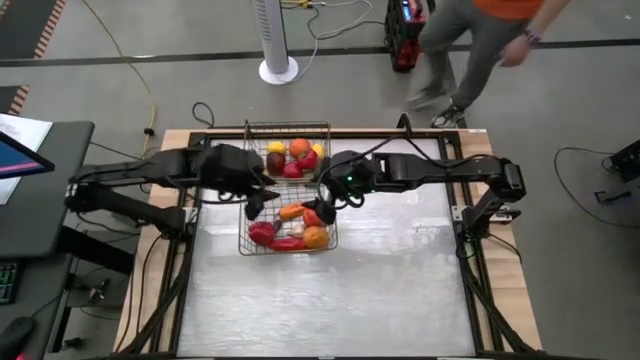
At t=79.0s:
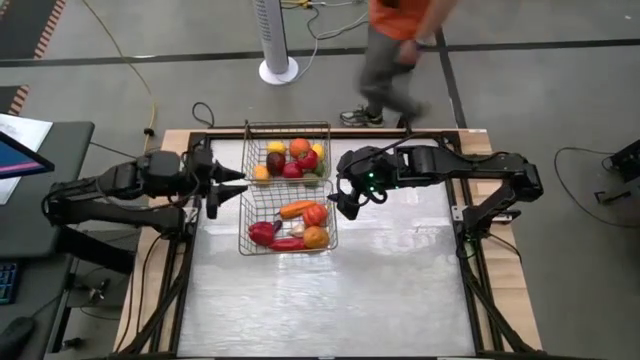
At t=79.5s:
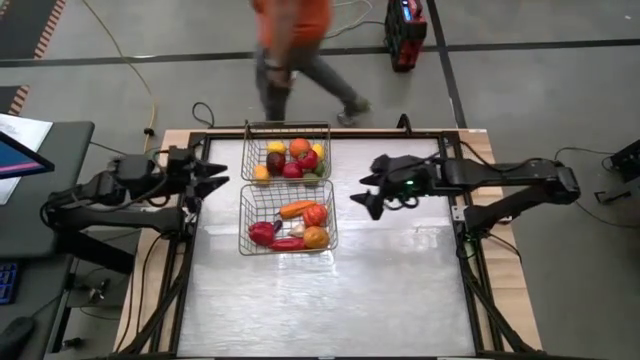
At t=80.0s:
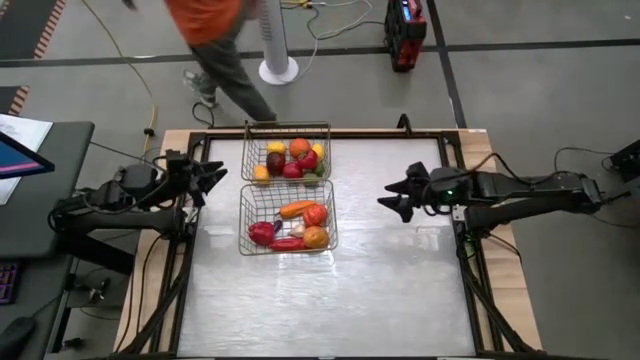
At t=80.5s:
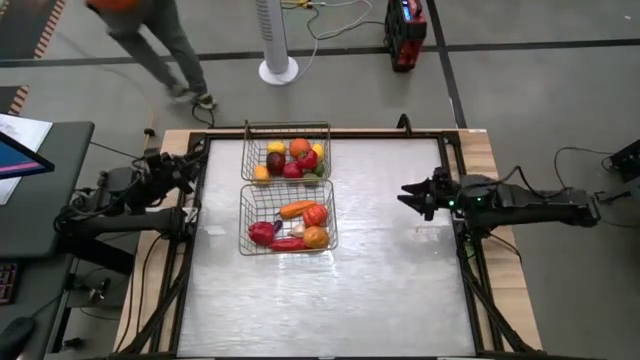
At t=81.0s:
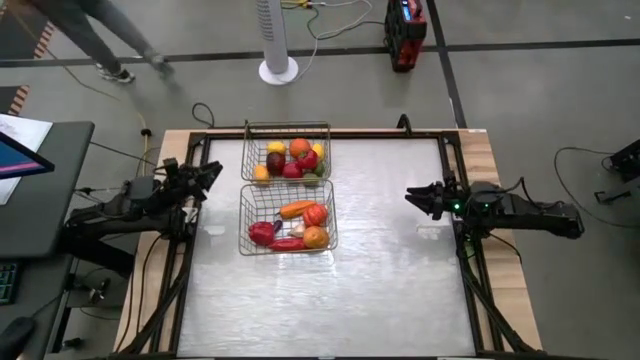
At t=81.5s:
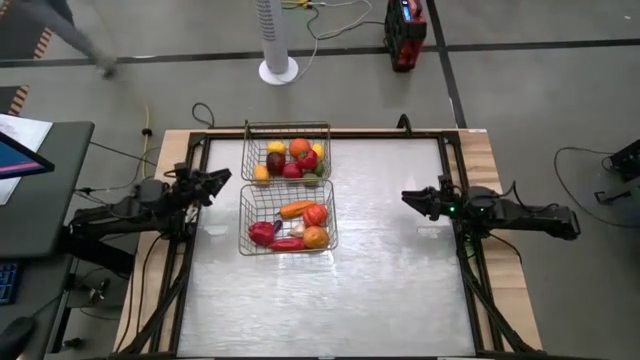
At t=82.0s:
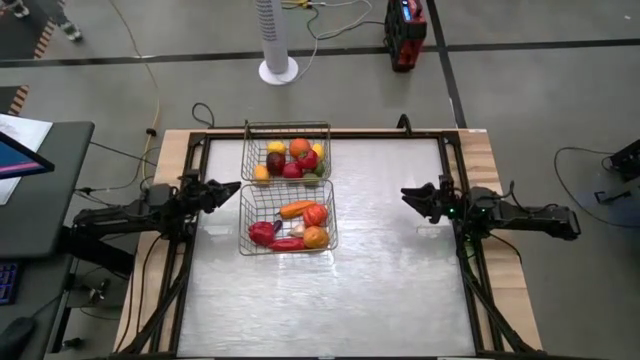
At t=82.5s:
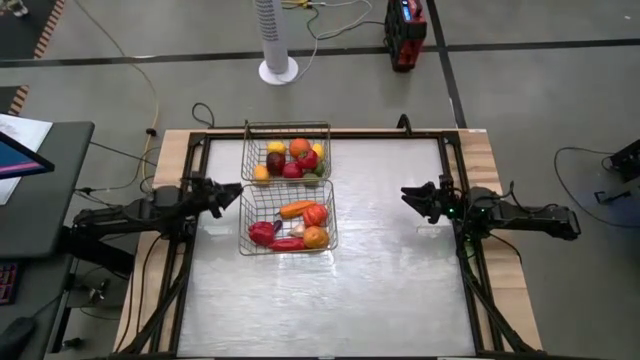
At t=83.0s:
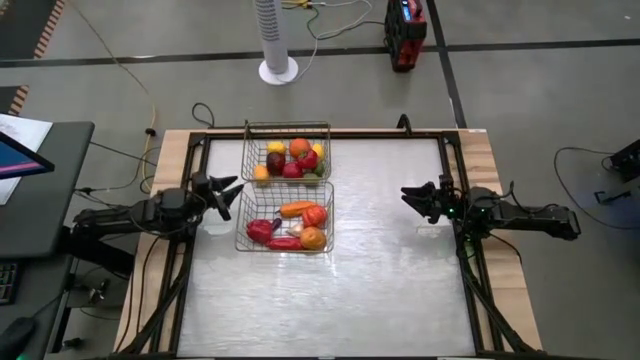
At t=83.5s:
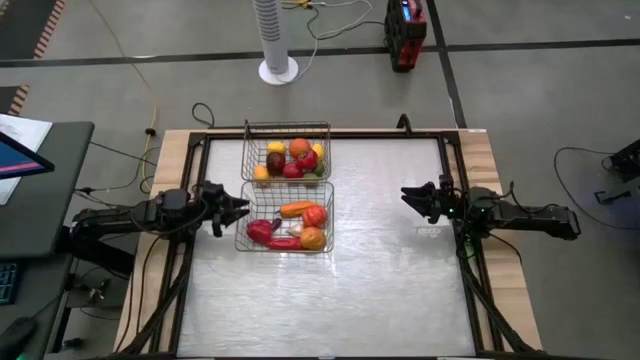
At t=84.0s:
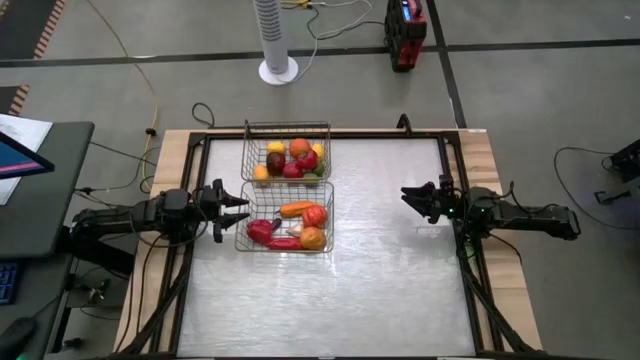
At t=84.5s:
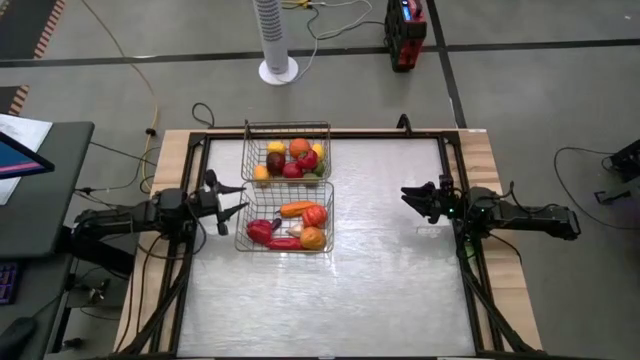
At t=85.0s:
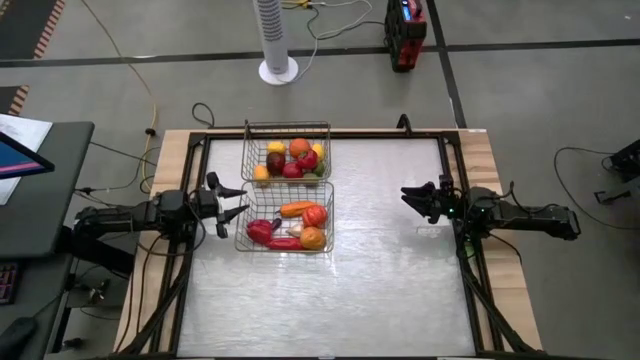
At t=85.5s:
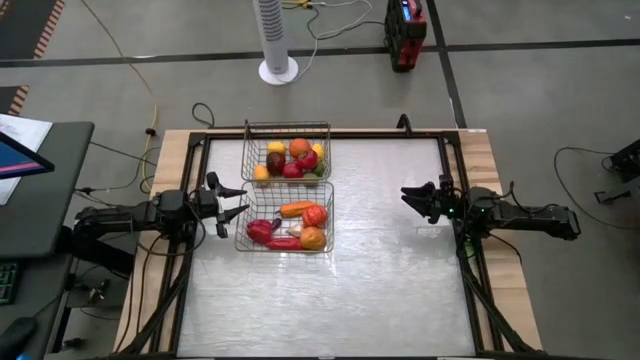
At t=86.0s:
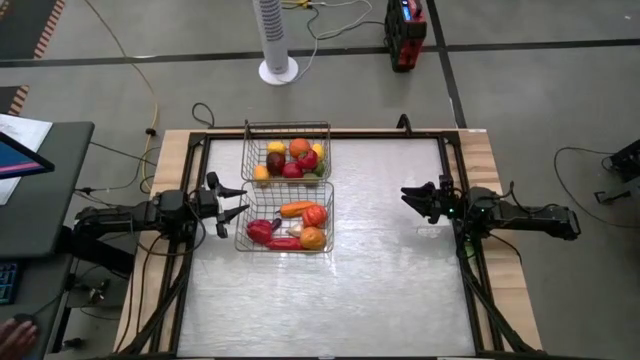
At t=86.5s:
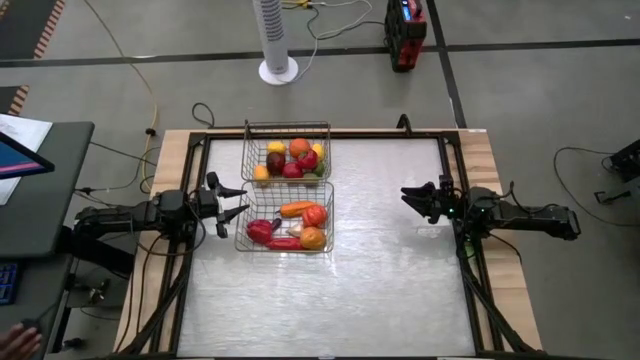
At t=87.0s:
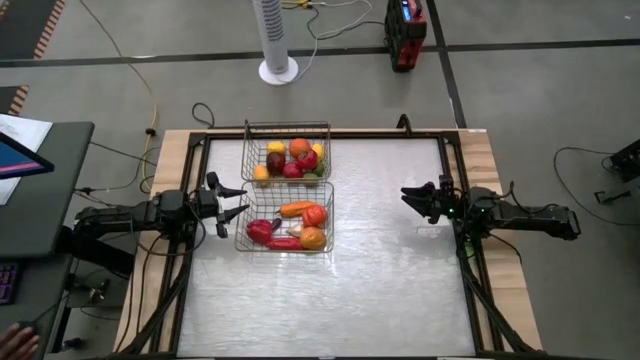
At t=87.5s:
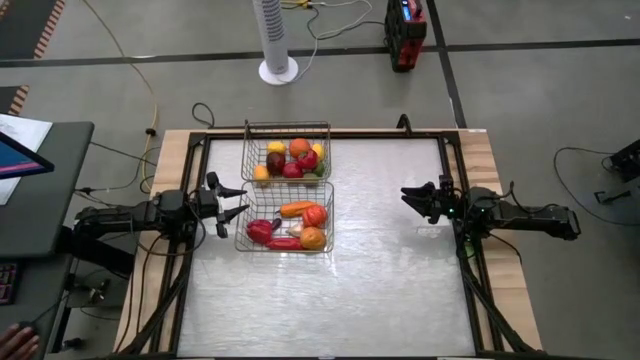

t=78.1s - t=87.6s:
Task: Sort produce into baskets
Return to Home Position

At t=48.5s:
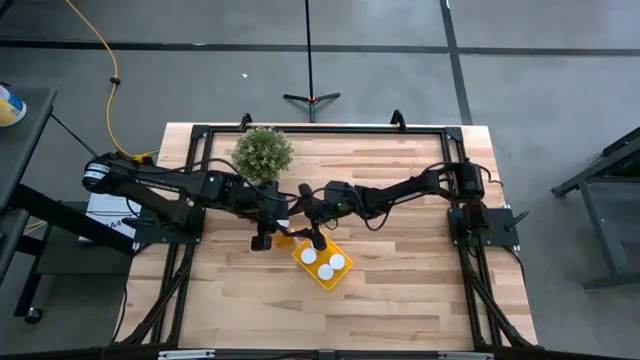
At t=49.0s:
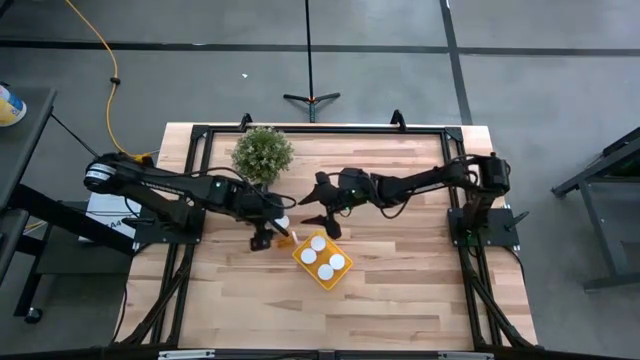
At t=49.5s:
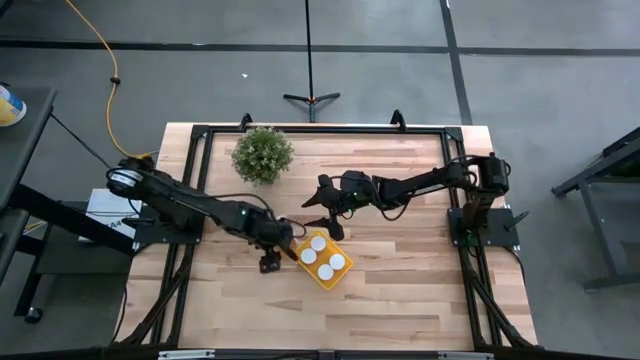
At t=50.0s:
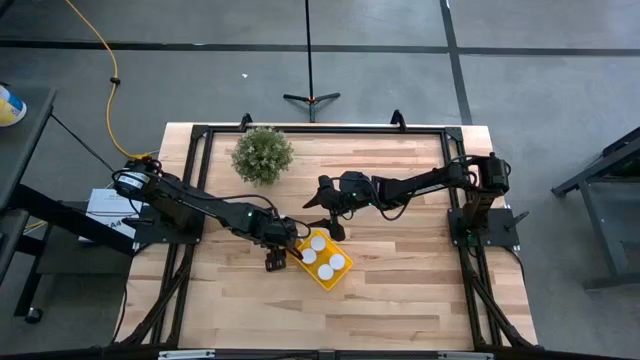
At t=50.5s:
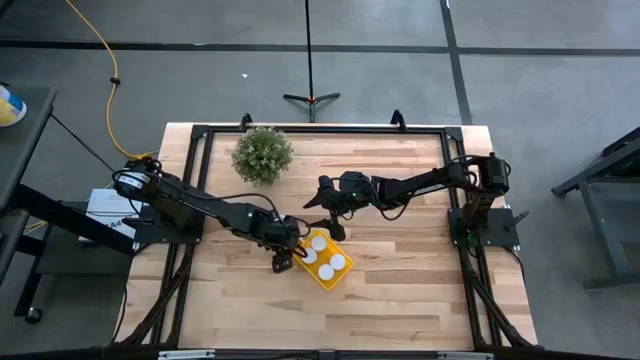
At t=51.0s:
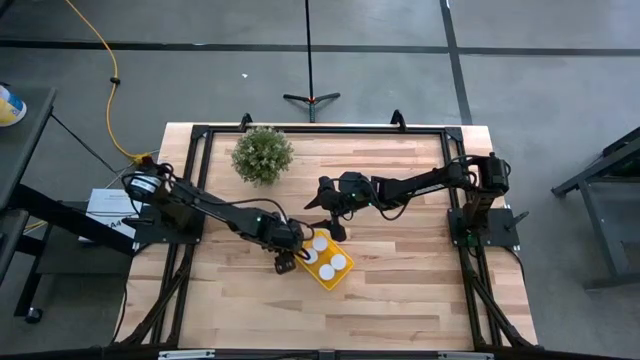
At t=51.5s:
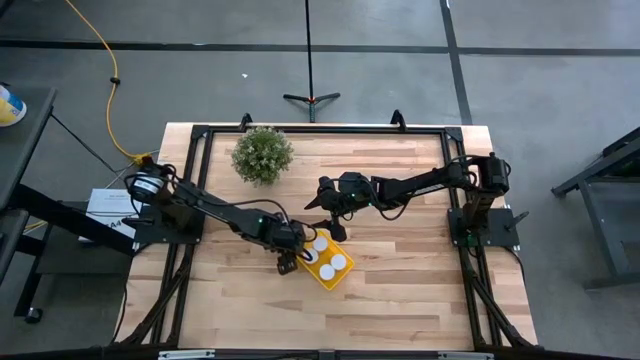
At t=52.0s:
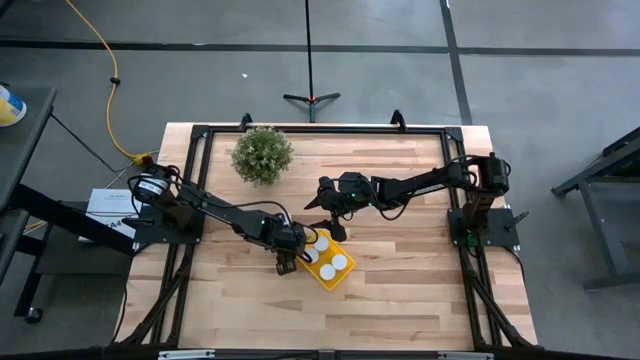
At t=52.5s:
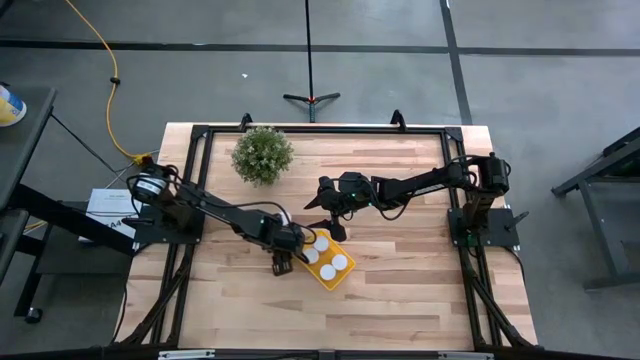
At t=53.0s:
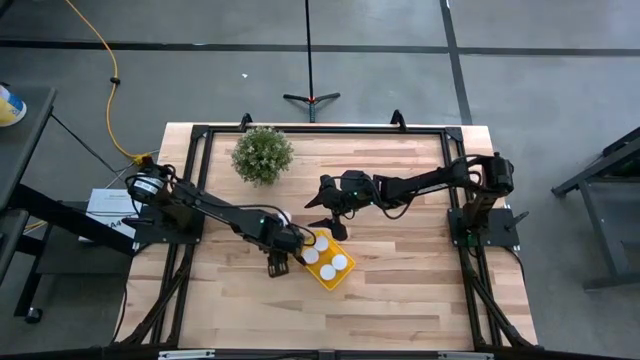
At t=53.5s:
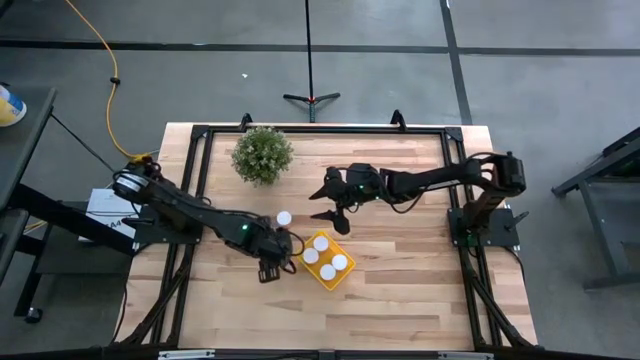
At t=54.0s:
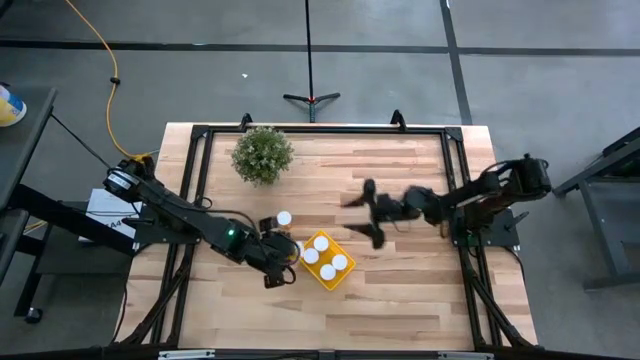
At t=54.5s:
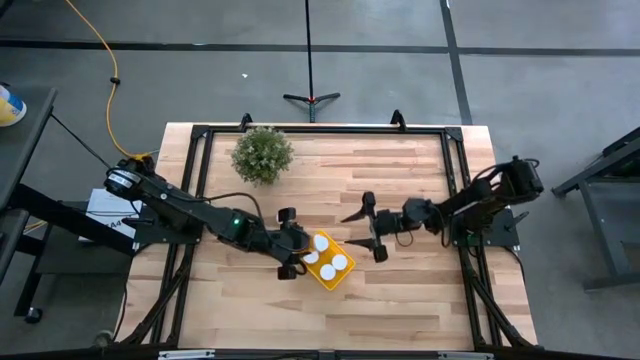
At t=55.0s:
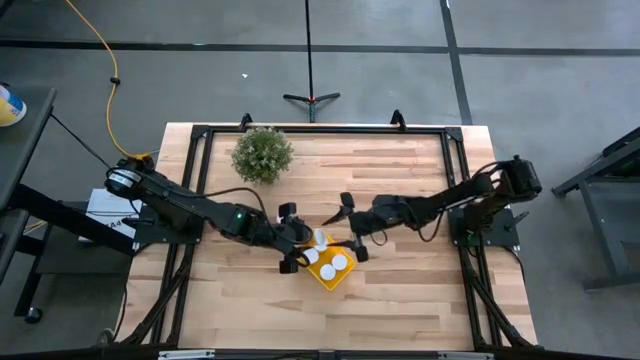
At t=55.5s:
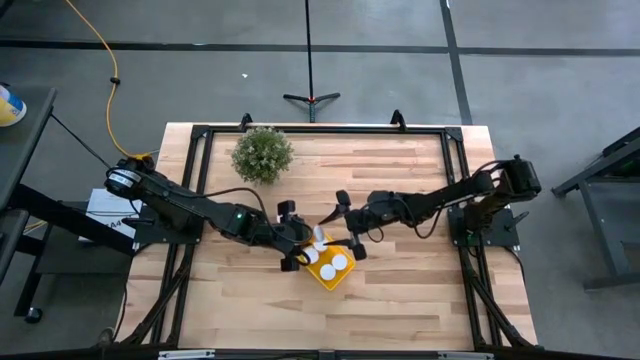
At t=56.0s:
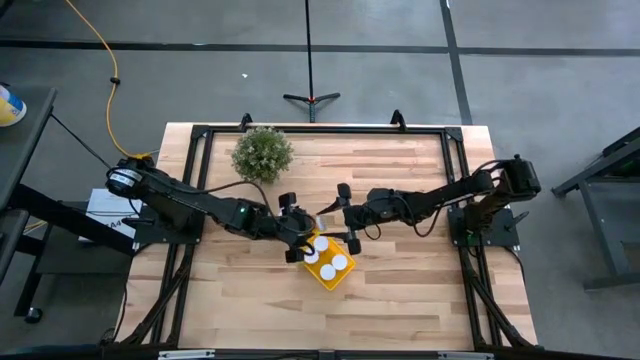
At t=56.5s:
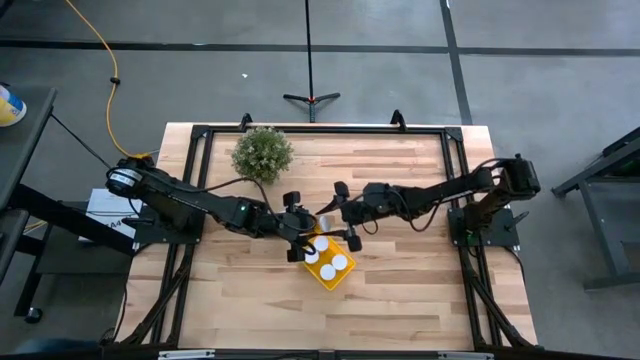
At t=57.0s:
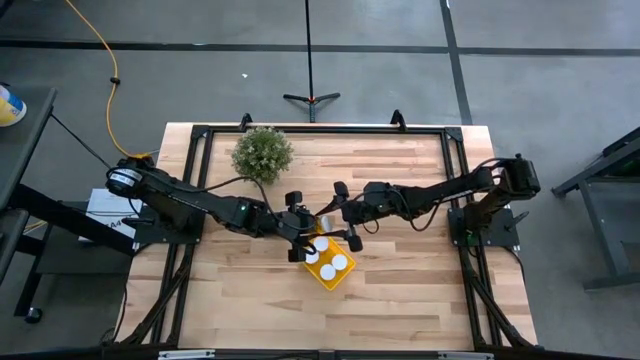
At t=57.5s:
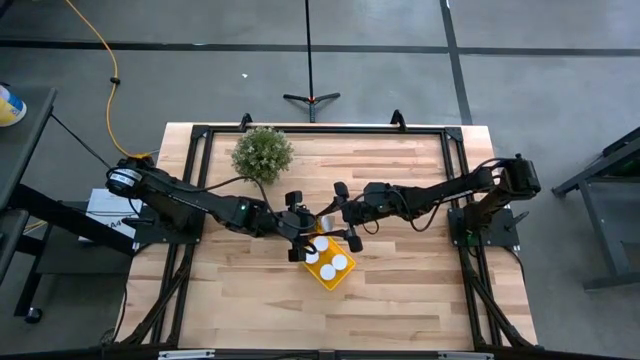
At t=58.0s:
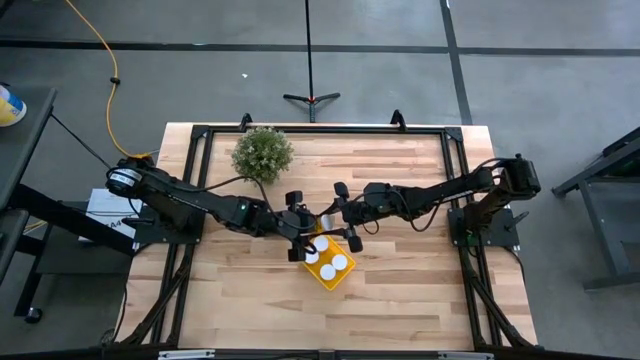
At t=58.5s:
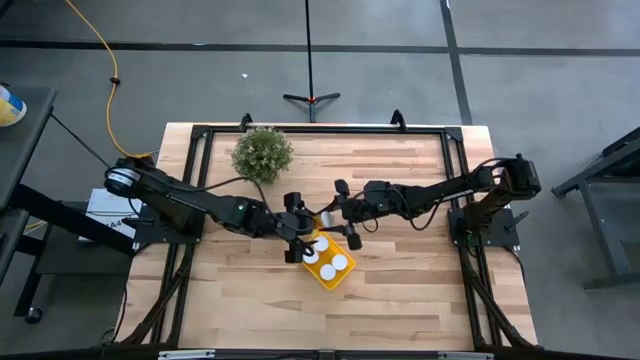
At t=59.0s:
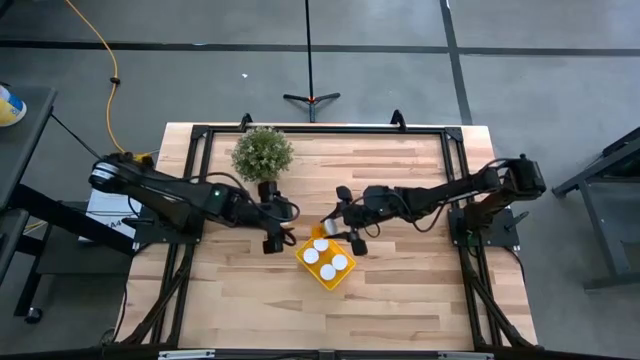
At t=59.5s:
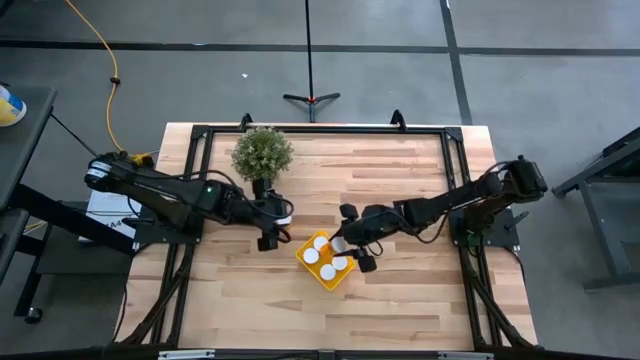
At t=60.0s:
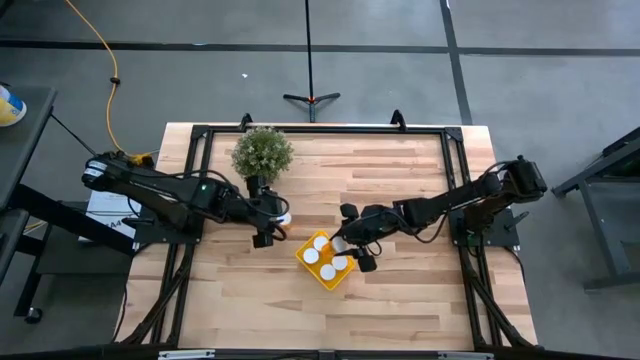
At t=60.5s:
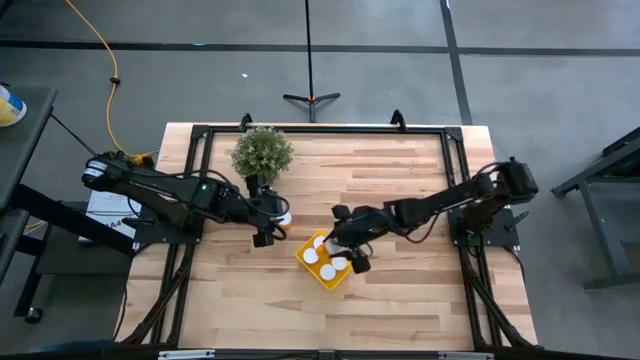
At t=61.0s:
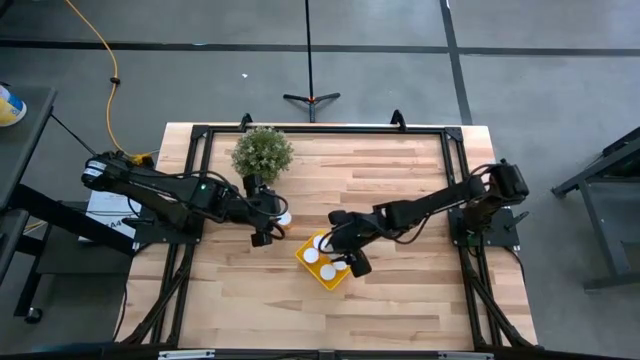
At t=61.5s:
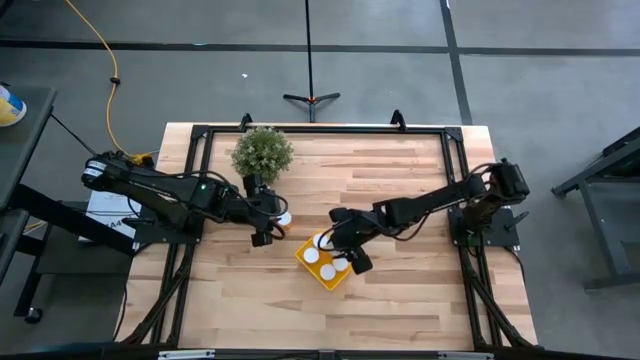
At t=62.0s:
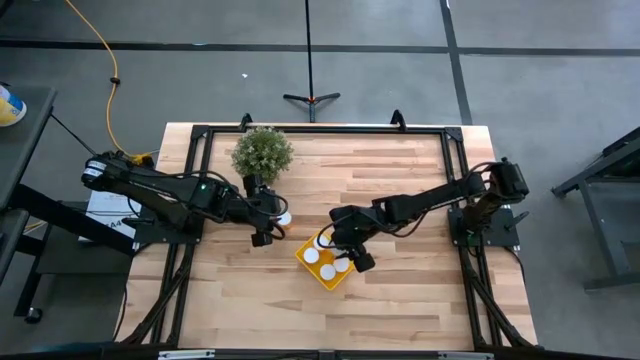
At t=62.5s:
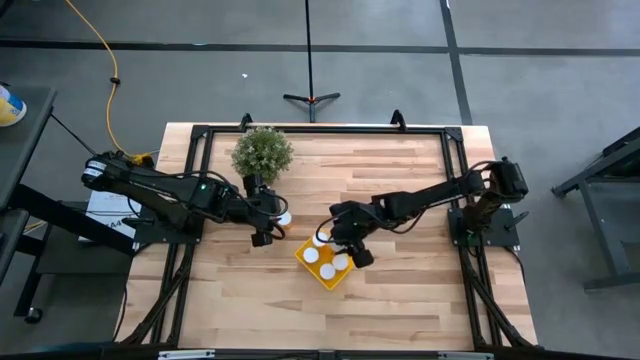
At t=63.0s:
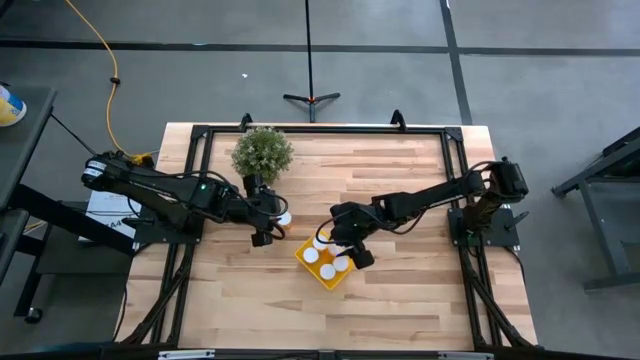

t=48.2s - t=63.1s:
Task: Pick and place pill bottles into a basket
Put the pill bottle into the yellow transparent bin
